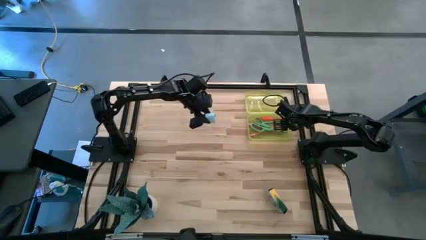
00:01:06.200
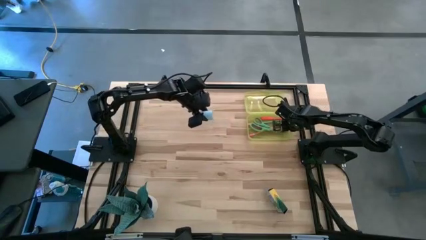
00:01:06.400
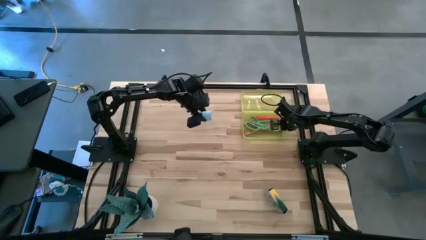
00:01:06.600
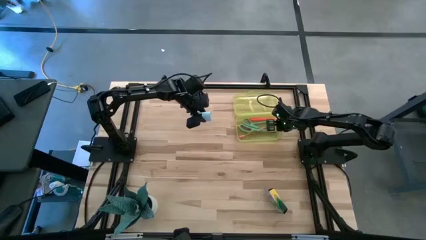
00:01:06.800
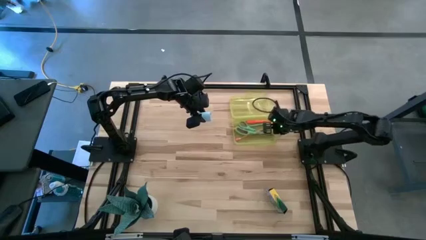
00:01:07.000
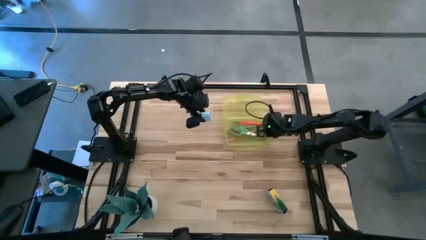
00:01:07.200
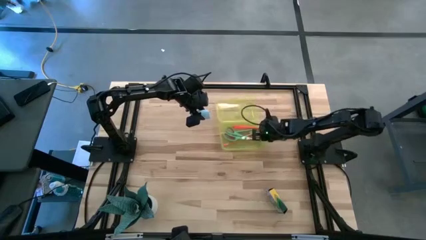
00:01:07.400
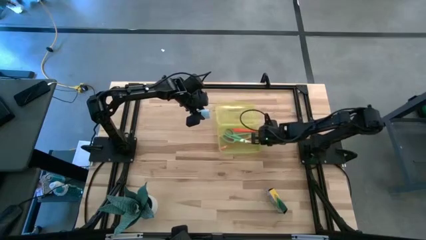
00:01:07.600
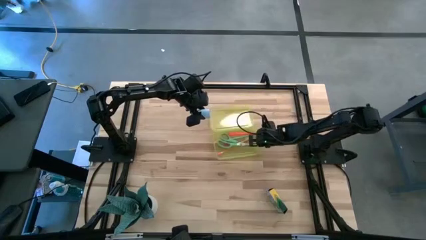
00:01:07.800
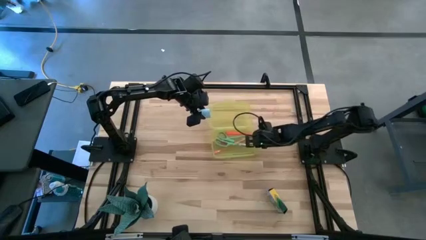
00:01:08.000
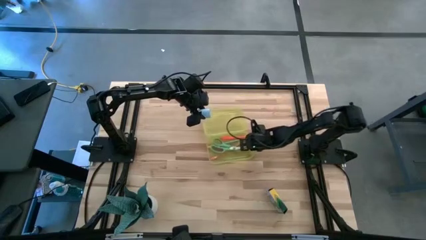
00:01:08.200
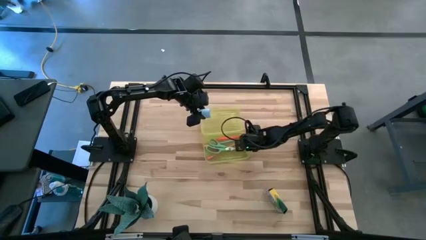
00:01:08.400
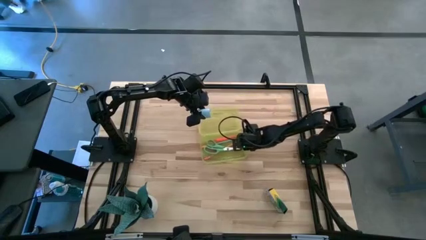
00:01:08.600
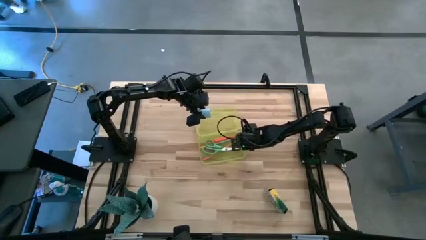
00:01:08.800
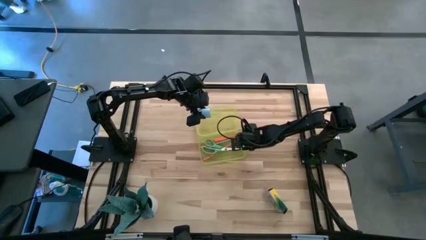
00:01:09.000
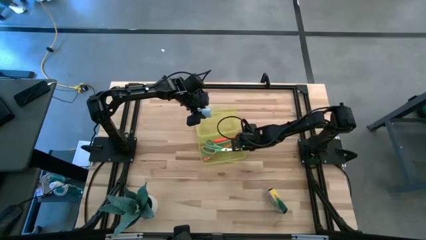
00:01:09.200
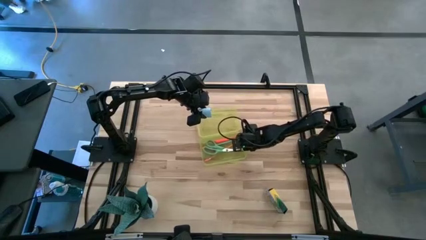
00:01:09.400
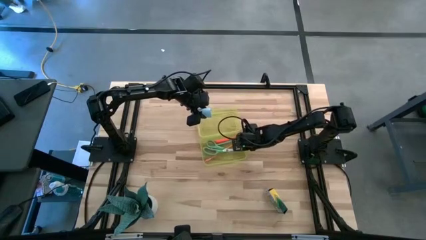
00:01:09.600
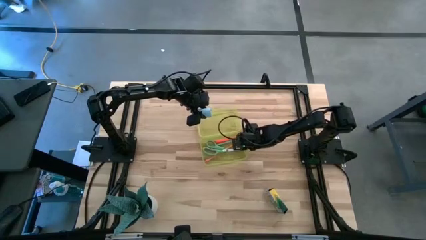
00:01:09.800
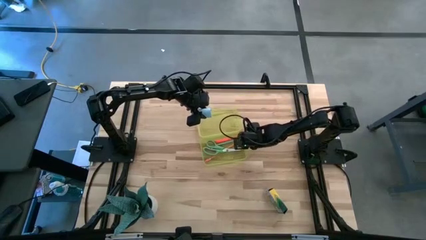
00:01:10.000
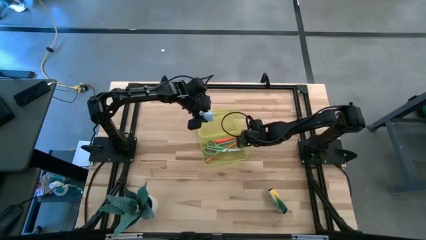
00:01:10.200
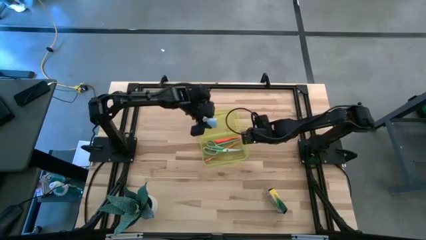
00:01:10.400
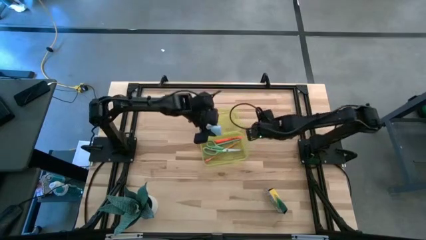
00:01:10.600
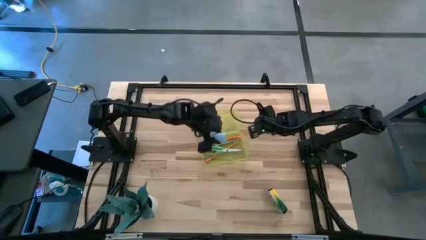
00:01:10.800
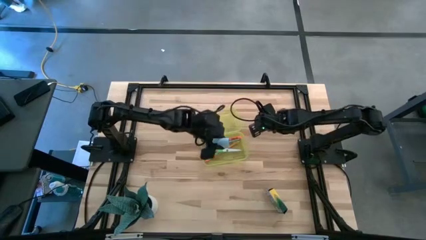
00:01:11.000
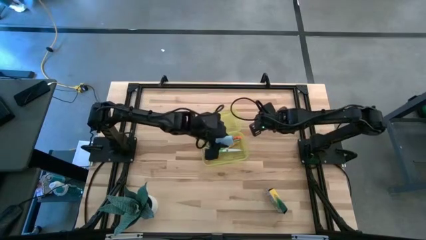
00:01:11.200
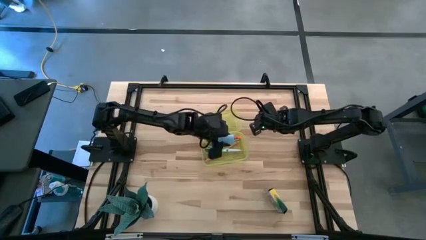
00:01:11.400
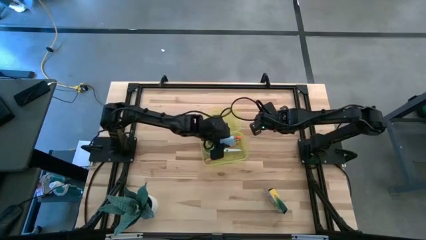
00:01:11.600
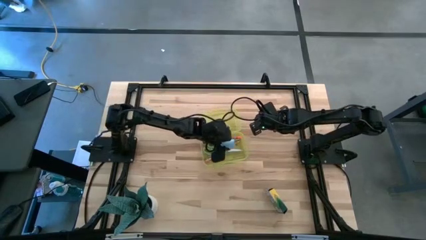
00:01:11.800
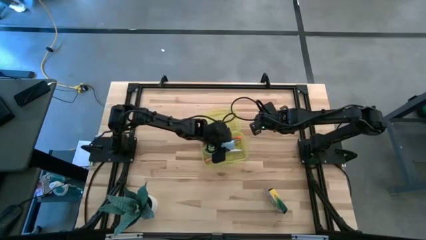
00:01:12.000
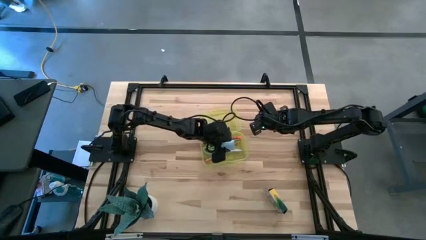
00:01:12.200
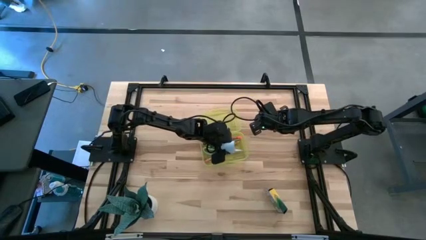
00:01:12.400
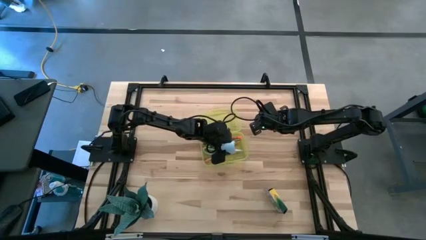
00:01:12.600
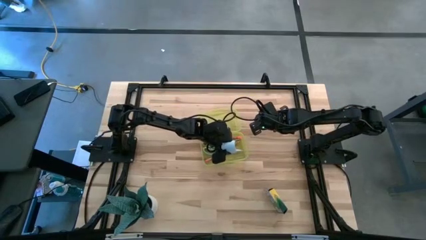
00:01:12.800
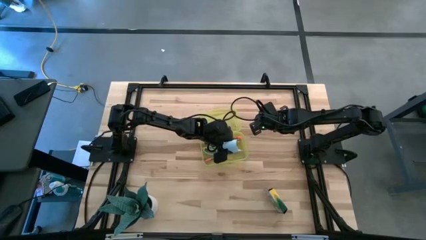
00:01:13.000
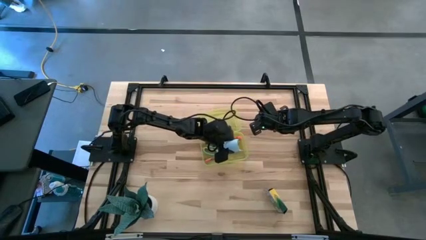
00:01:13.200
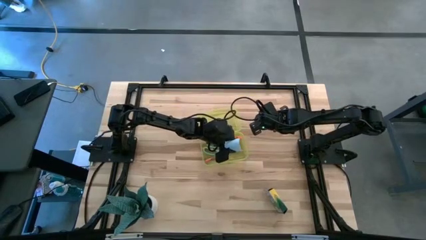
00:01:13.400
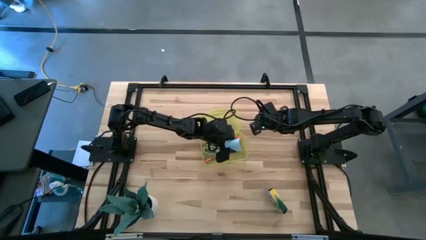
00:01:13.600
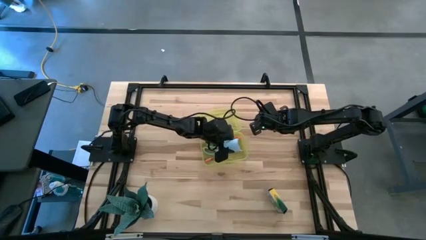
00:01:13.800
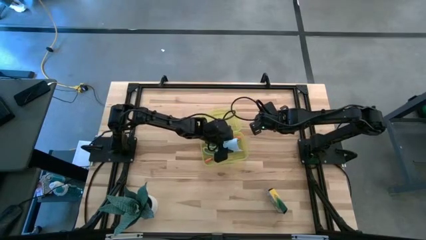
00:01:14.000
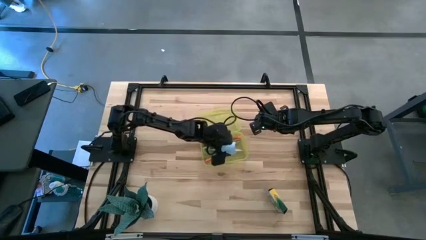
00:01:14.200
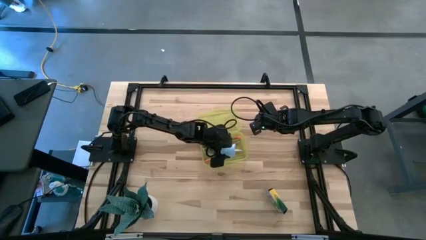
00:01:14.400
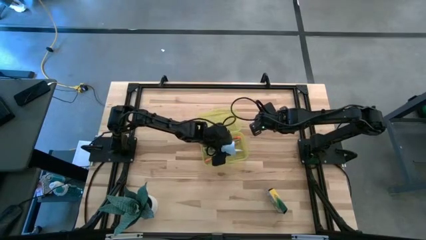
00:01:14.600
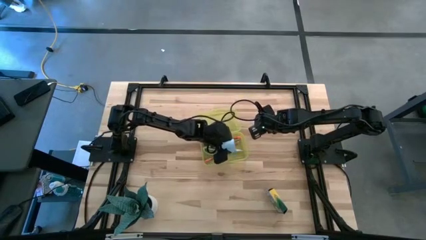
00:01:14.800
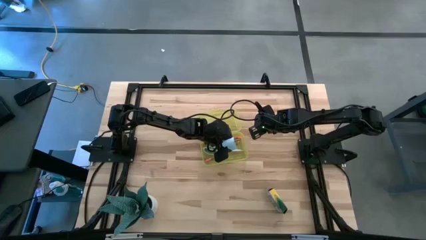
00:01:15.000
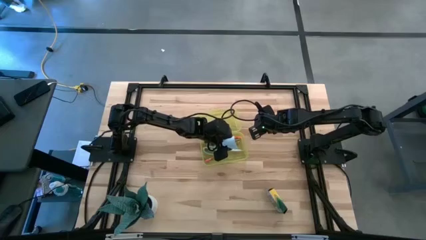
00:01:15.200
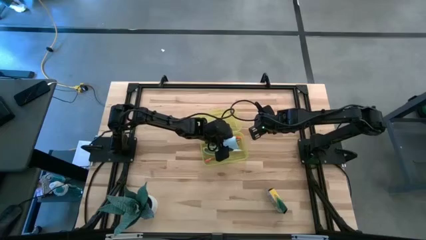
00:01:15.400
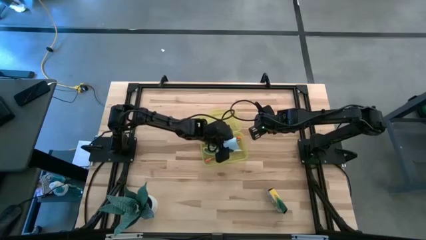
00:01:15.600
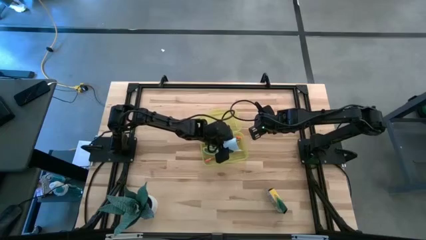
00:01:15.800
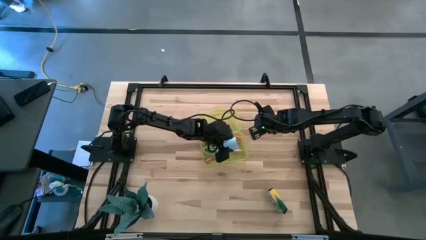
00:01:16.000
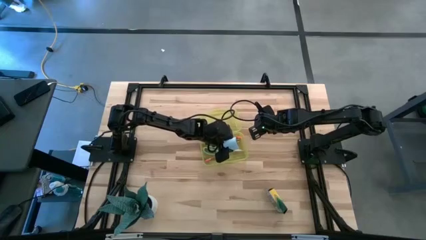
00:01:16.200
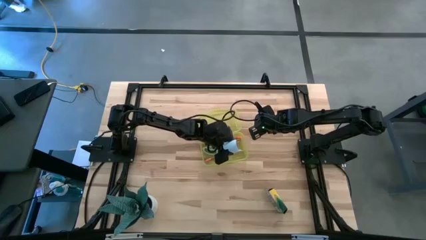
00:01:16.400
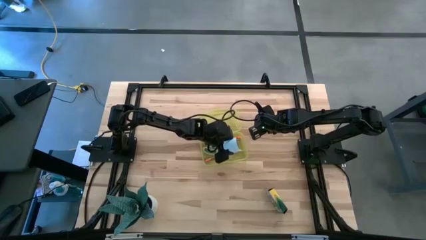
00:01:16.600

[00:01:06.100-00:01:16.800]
Task: Pack school essentials
Put the blue sticky notes into the yellow storage box

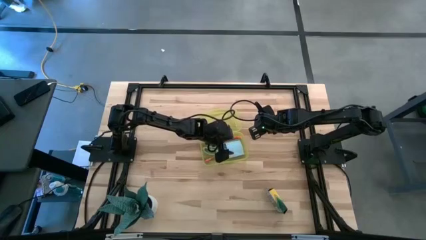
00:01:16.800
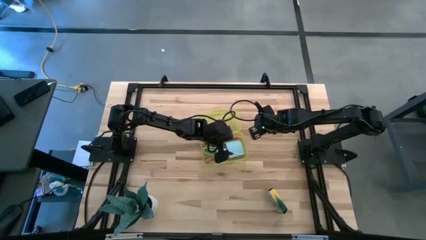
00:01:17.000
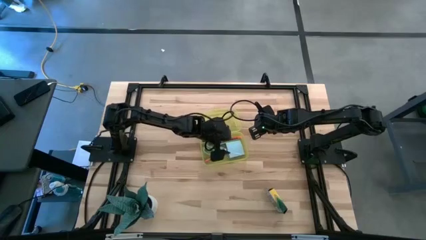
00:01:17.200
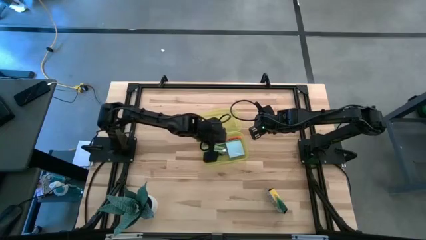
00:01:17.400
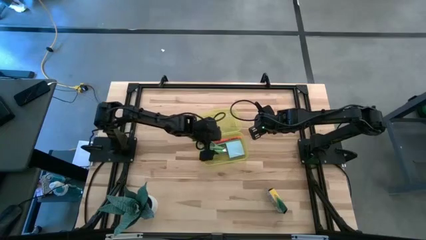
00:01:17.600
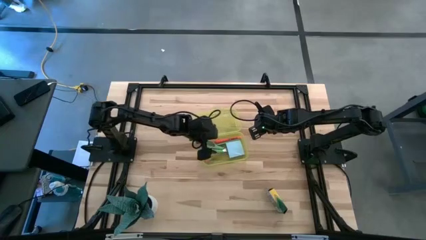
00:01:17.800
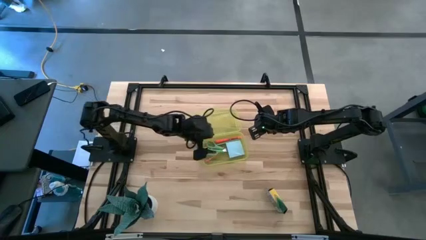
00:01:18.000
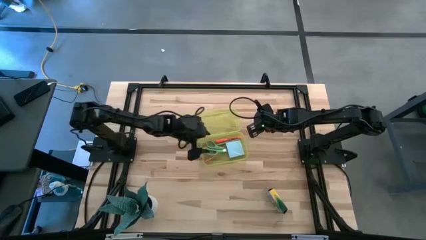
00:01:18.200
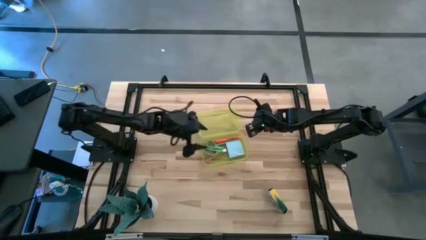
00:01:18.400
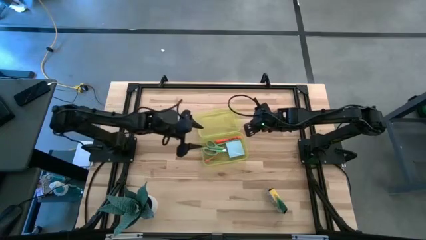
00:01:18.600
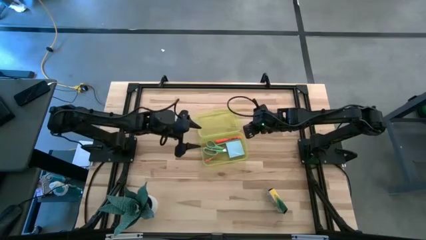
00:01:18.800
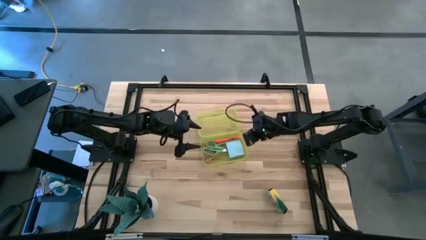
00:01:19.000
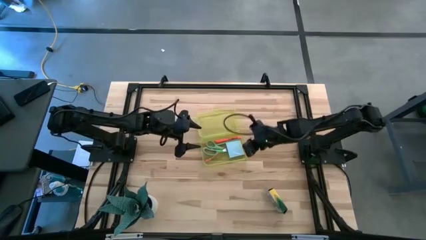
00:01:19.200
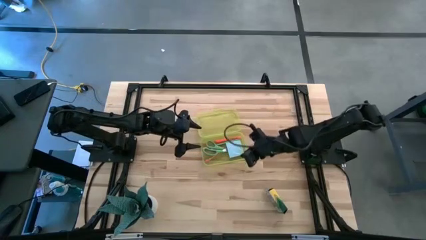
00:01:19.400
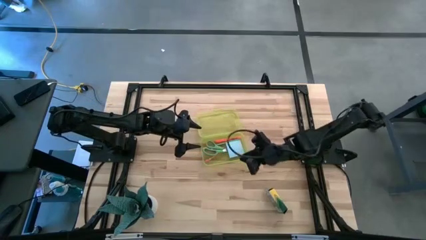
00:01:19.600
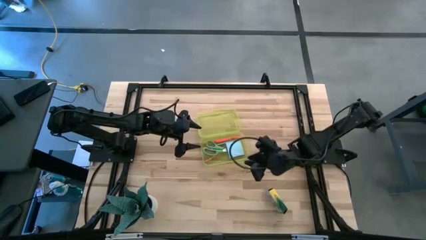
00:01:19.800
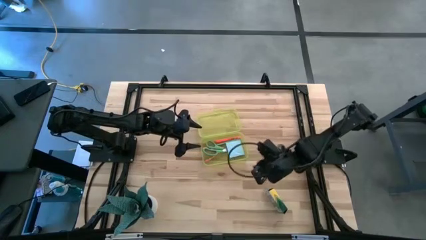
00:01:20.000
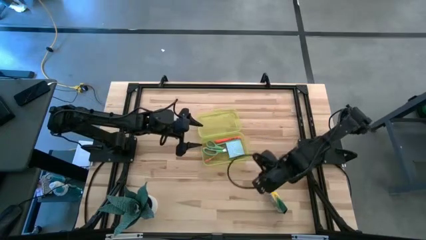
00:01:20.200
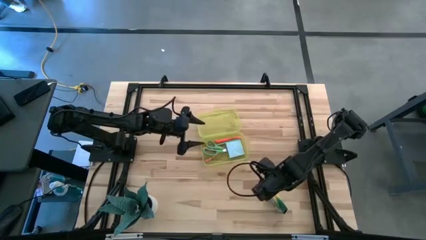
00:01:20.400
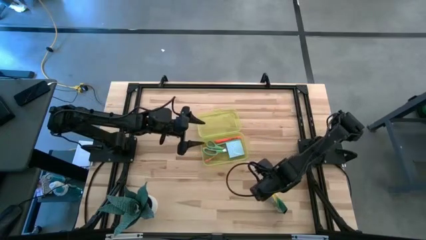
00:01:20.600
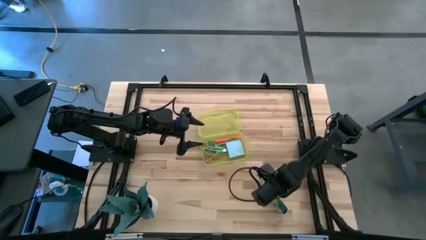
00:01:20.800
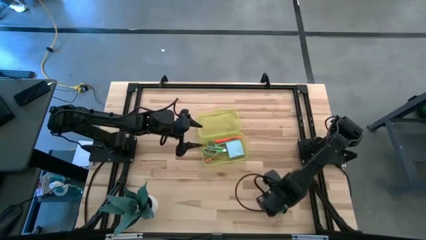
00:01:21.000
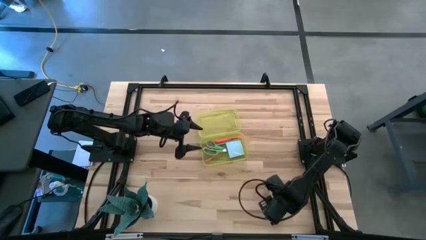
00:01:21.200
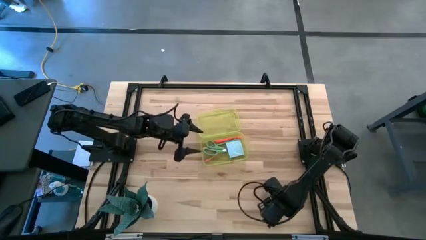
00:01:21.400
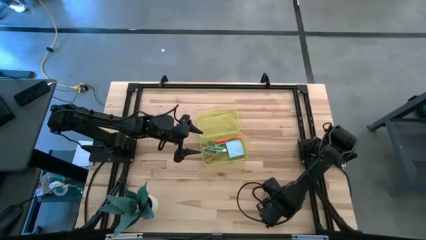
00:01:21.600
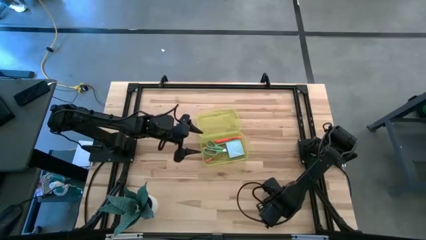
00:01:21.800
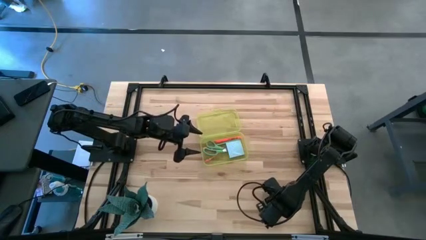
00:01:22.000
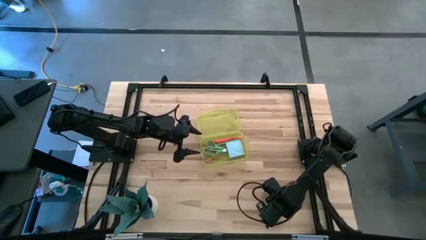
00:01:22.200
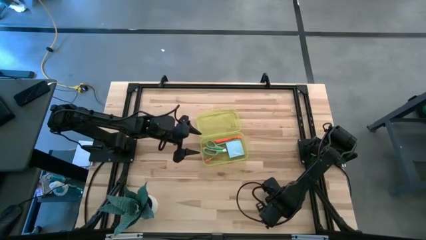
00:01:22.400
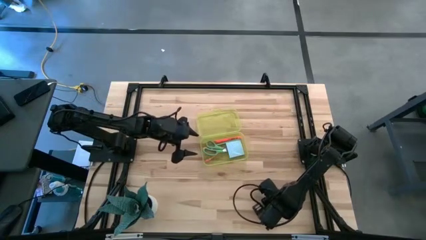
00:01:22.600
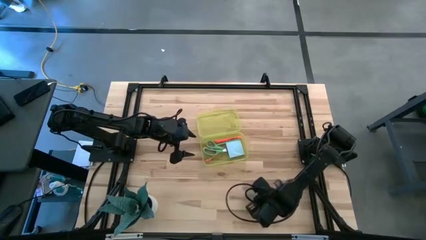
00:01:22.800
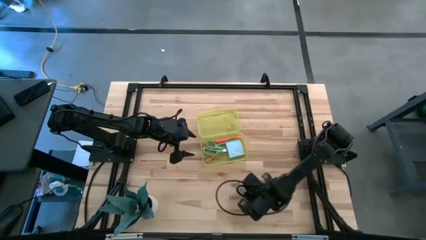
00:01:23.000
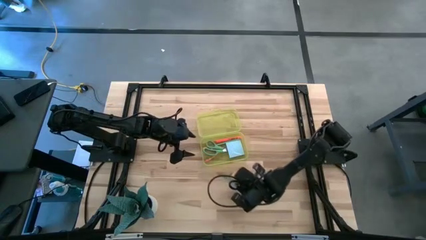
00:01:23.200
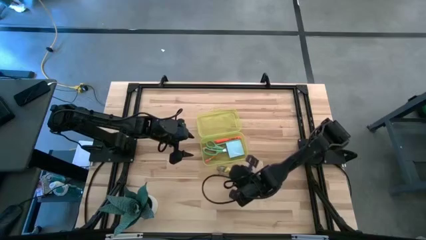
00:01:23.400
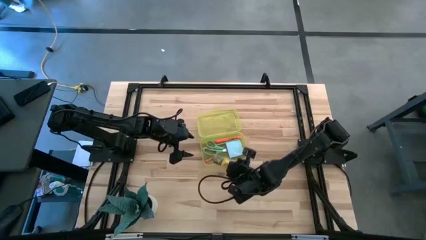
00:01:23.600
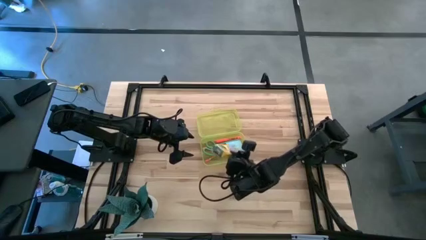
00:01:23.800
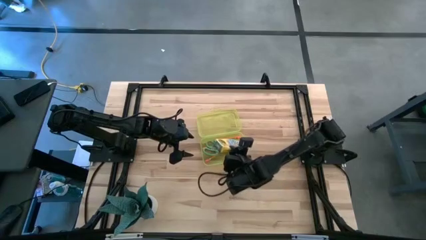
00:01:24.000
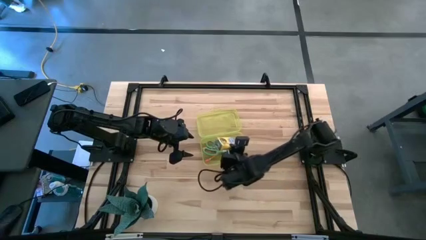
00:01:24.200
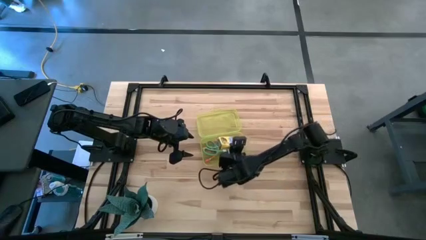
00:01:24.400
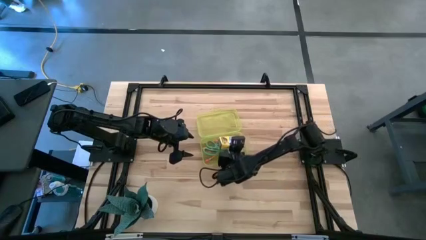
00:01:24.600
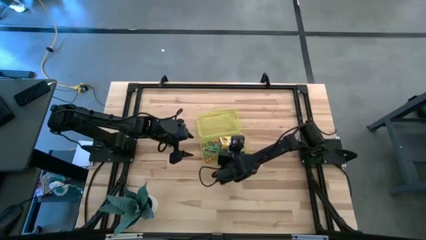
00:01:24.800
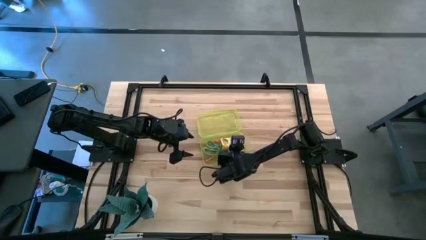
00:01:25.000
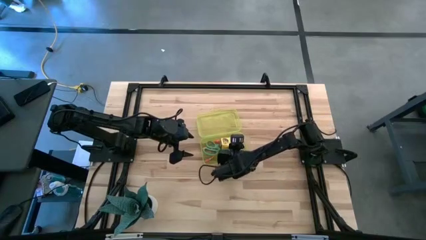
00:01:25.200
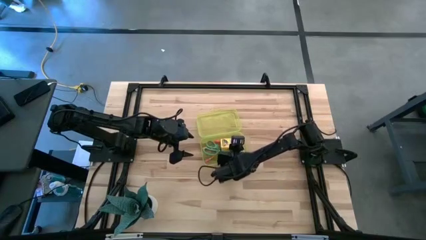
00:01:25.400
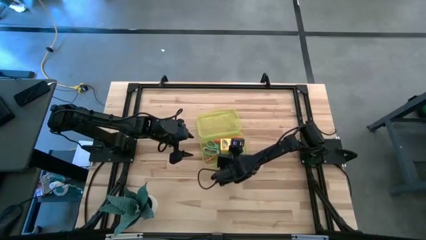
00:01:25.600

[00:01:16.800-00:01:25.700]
Put the box of crayons into the yellow storage box
